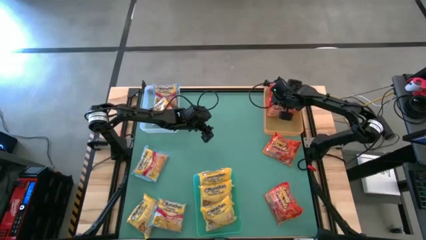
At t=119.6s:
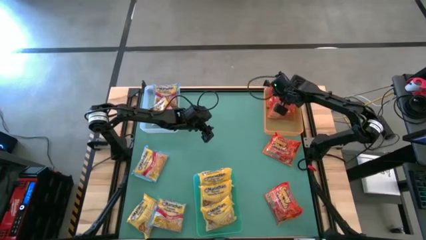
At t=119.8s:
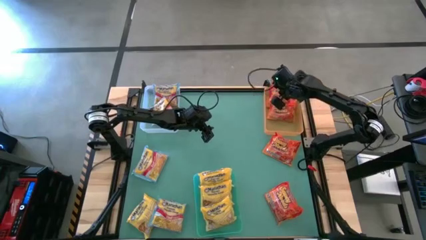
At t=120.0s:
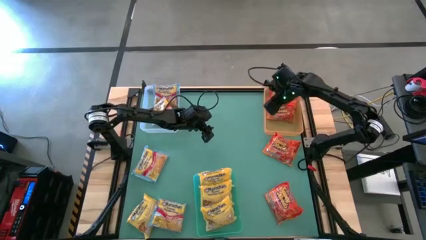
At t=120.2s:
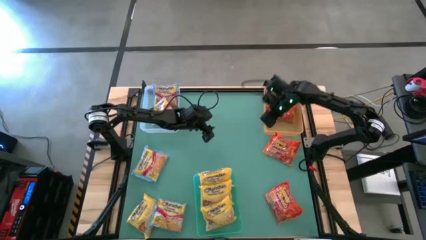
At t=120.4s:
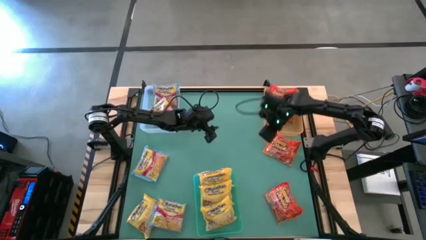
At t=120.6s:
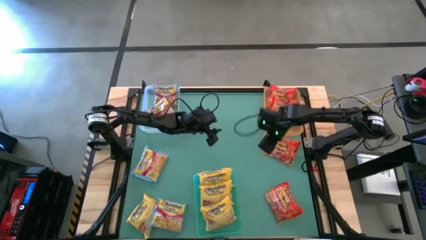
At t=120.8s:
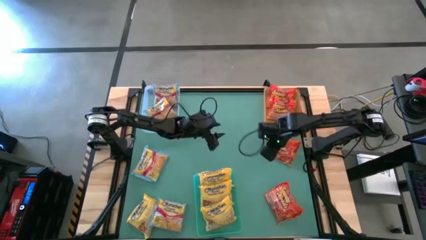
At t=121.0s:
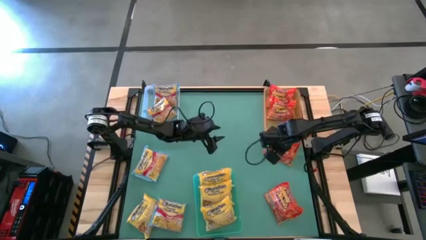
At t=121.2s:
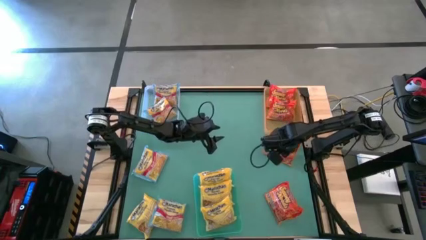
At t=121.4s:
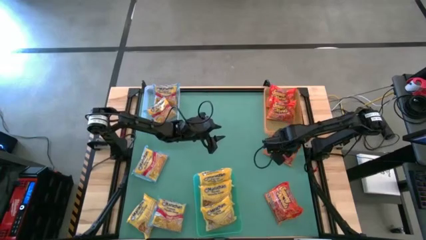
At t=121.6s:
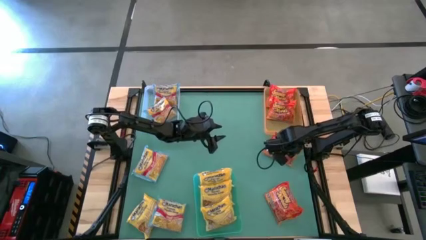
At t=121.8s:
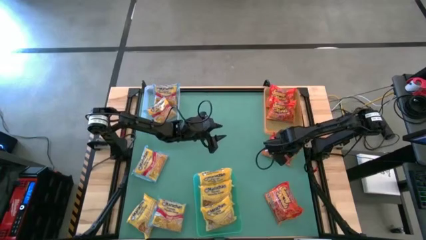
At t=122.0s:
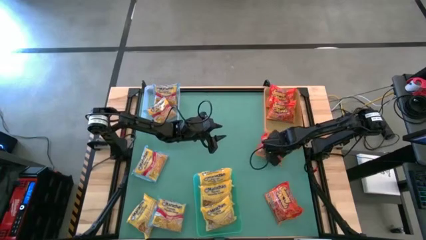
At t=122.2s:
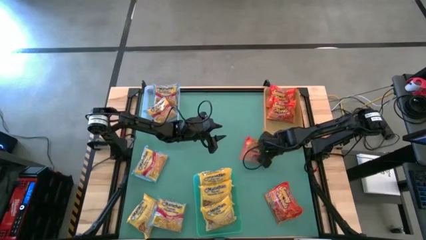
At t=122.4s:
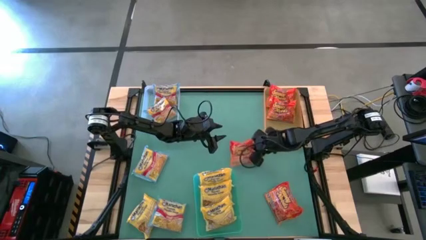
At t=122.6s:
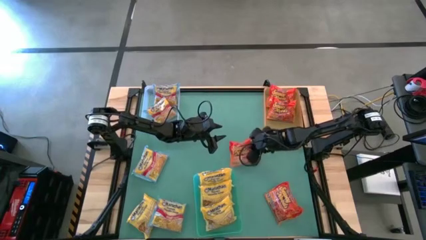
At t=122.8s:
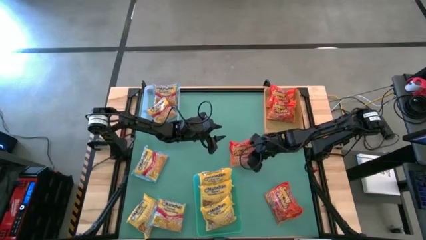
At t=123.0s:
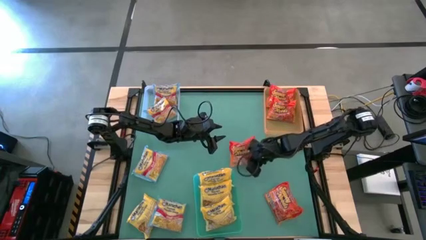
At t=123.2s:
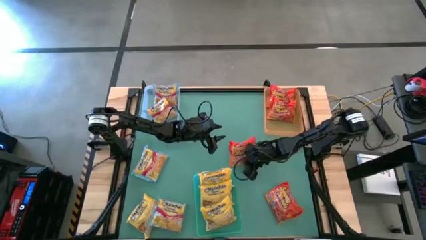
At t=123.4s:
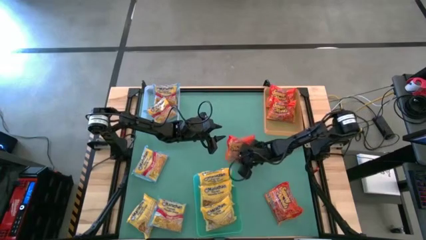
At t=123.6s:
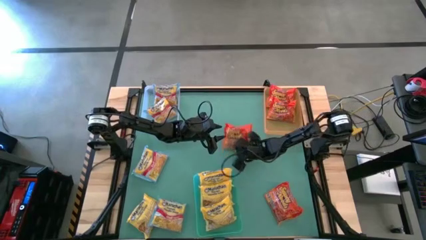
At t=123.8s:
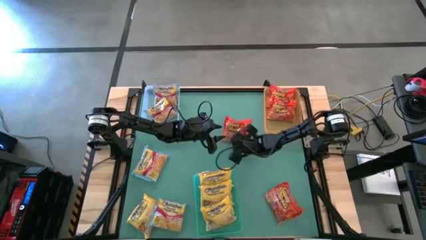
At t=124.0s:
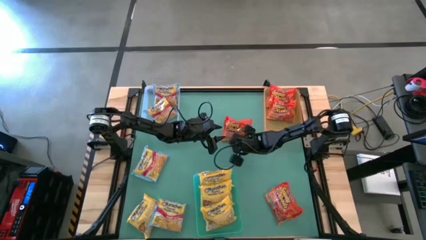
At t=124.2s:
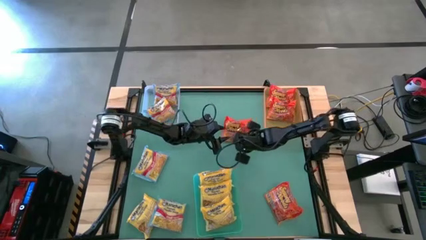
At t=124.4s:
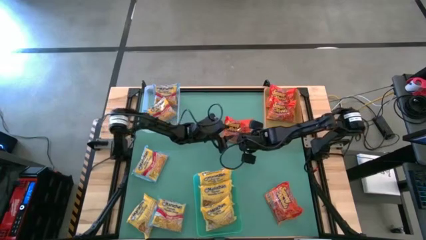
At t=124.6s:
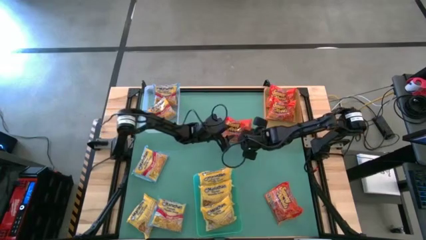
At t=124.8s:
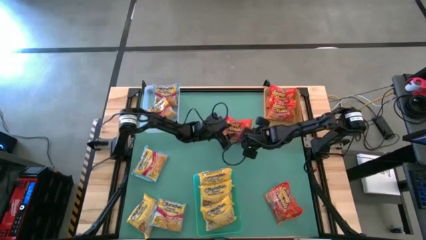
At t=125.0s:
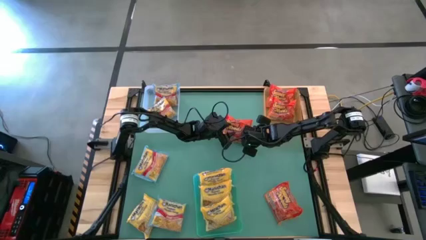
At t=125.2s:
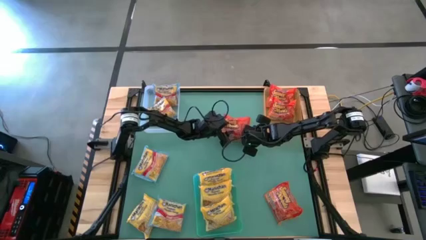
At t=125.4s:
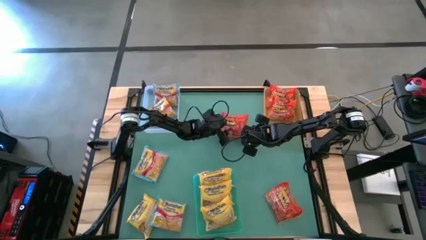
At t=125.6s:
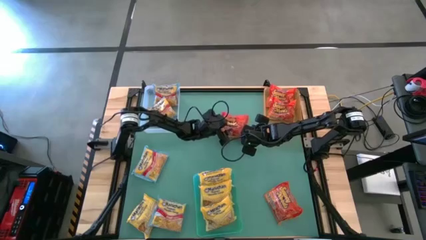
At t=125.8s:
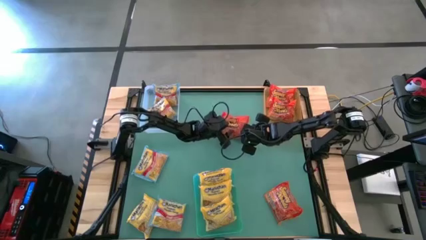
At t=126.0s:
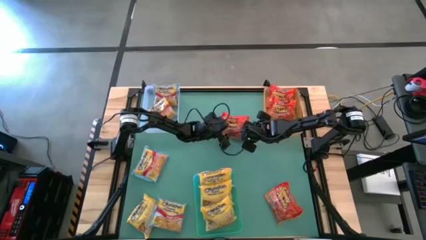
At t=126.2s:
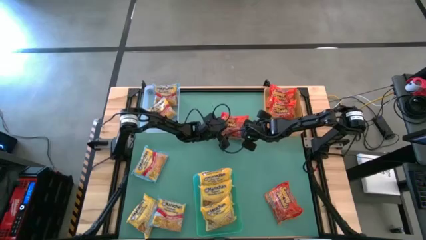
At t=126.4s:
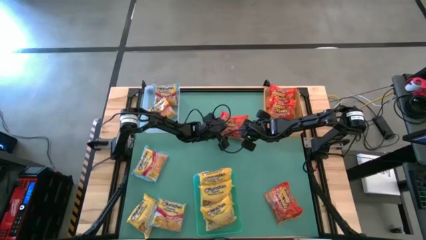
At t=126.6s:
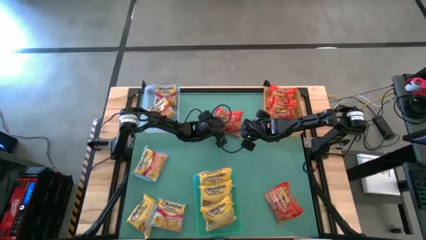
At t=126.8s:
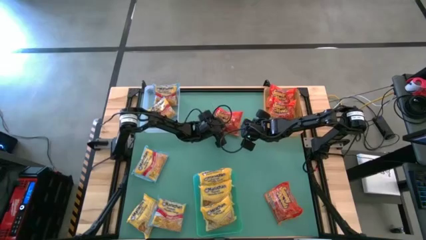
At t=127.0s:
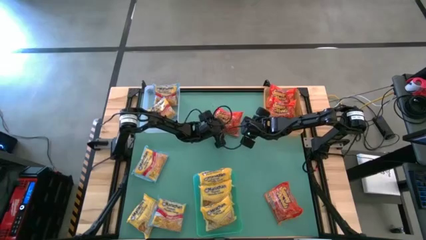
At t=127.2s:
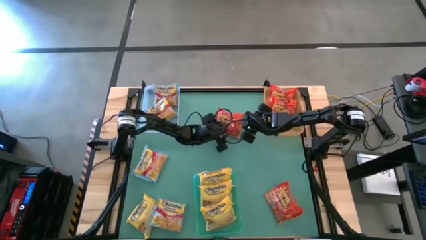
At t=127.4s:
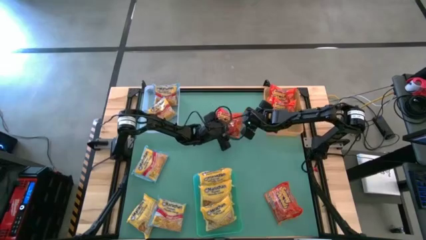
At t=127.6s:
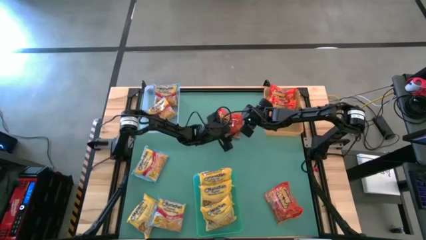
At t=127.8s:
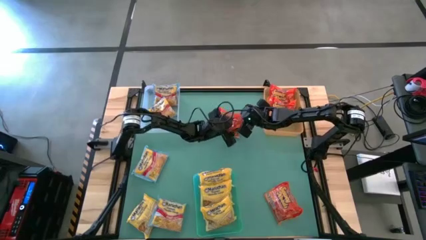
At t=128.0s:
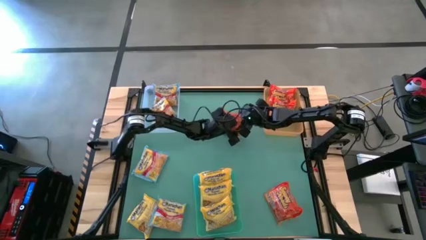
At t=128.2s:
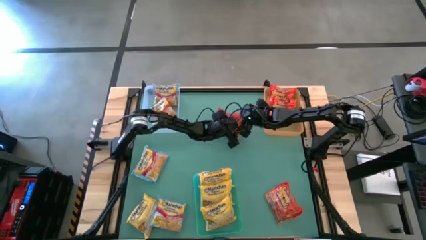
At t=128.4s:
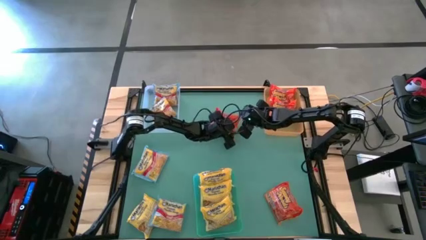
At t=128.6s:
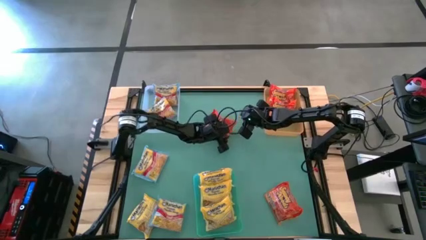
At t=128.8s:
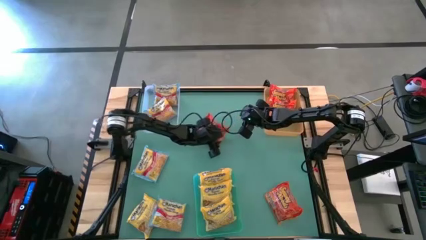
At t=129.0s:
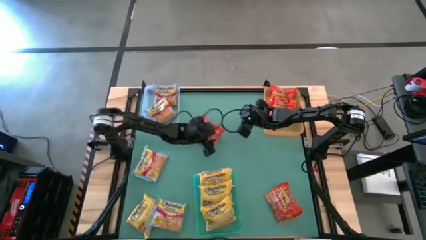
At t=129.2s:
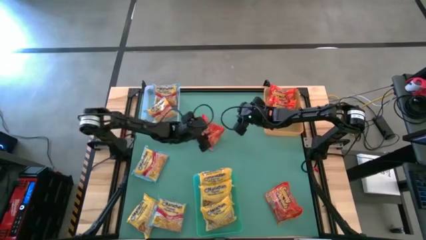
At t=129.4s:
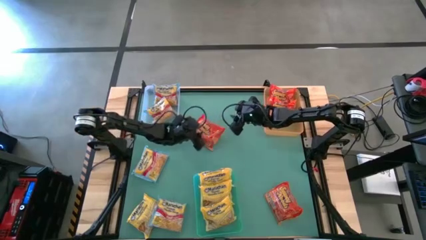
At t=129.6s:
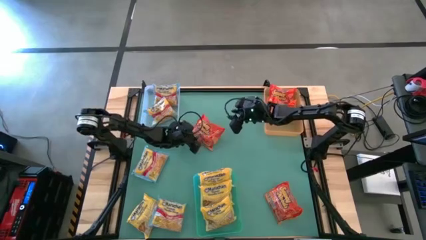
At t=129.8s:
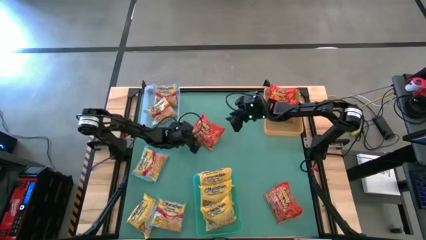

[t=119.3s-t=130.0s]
Task: Sort Maruchan noodles
Put the top red noodle pack into the orange bin
